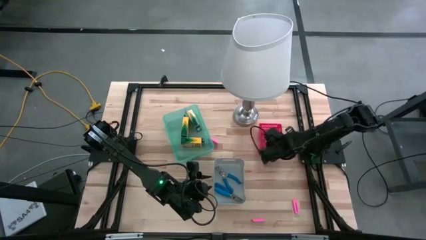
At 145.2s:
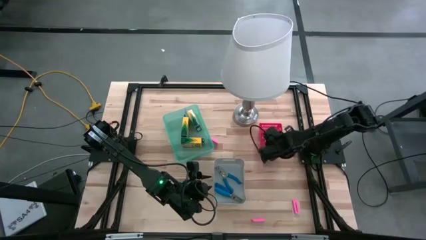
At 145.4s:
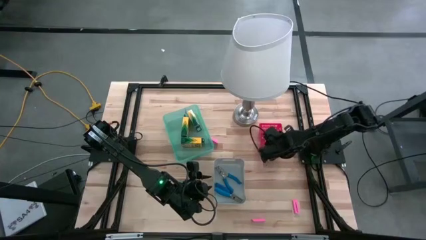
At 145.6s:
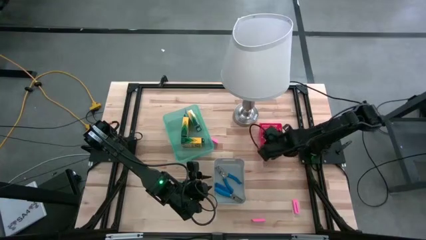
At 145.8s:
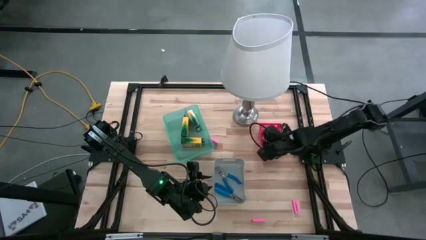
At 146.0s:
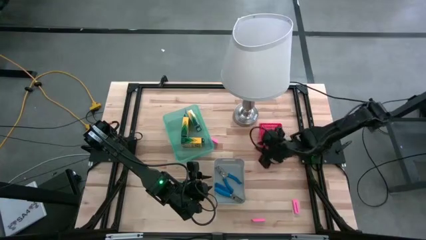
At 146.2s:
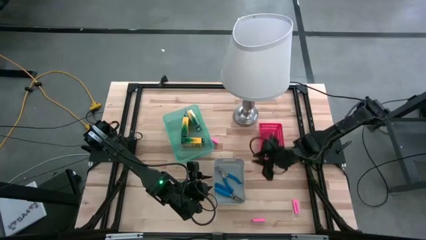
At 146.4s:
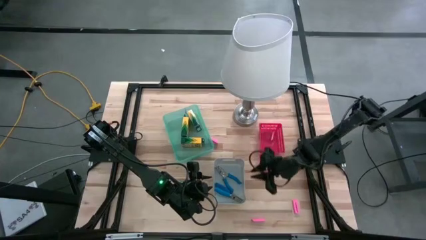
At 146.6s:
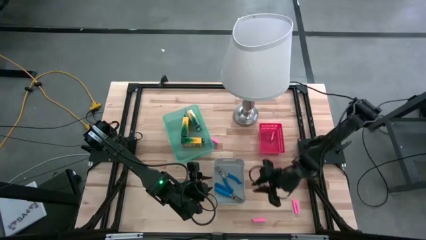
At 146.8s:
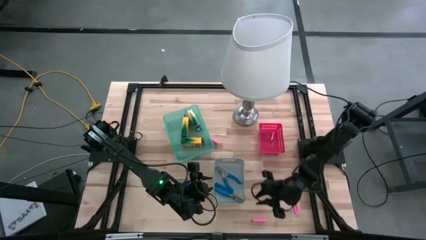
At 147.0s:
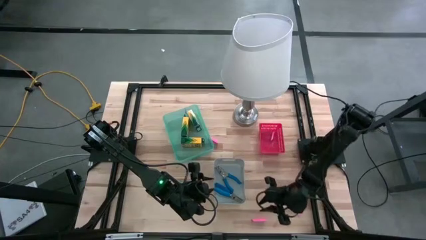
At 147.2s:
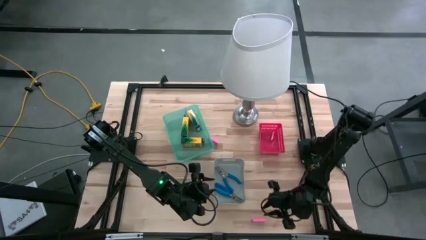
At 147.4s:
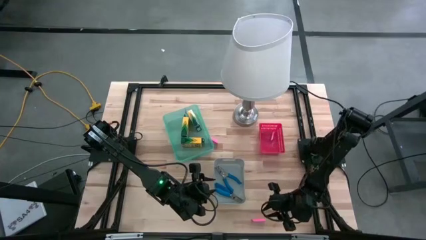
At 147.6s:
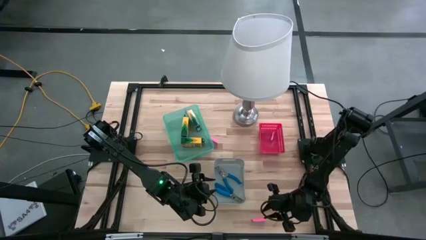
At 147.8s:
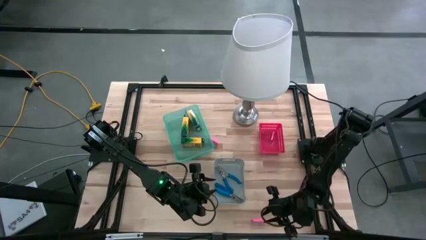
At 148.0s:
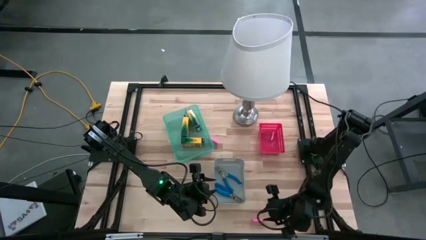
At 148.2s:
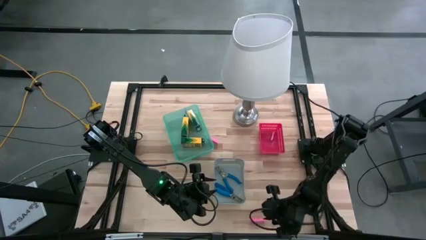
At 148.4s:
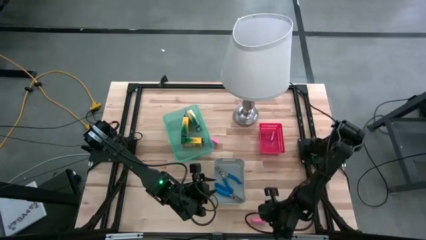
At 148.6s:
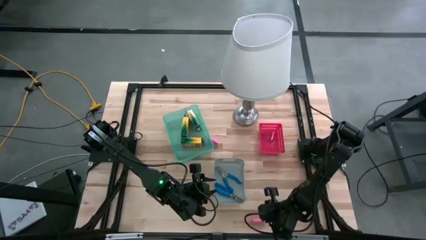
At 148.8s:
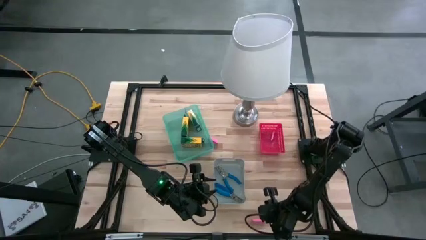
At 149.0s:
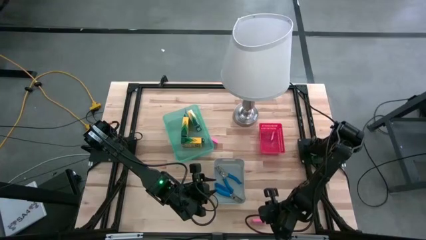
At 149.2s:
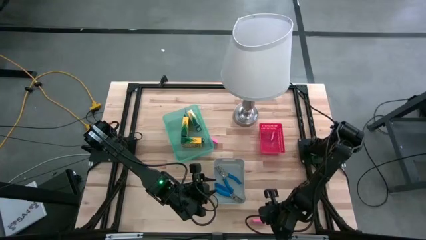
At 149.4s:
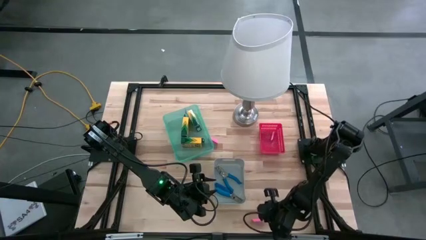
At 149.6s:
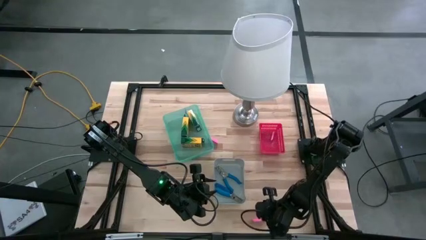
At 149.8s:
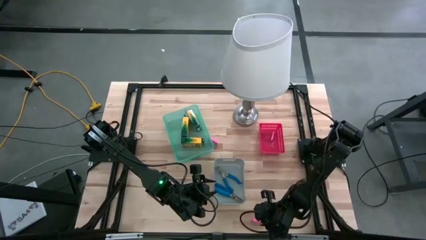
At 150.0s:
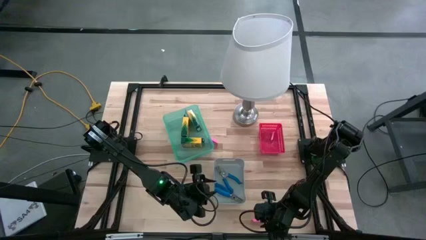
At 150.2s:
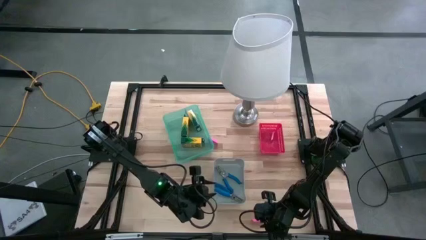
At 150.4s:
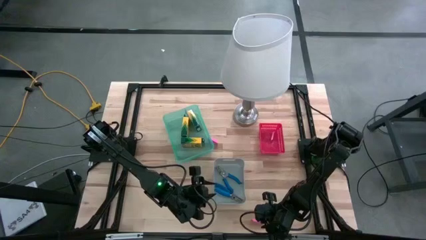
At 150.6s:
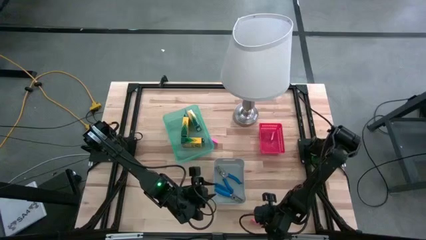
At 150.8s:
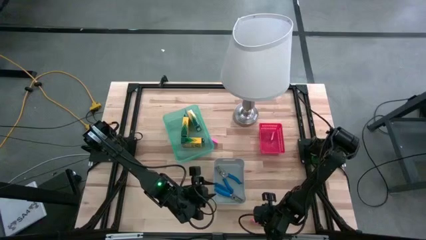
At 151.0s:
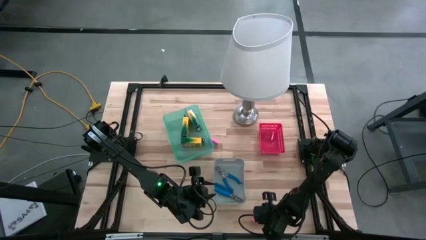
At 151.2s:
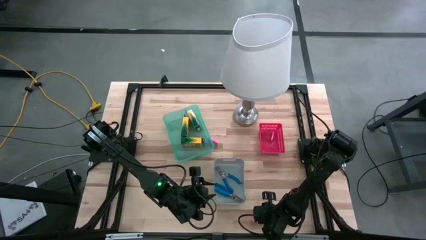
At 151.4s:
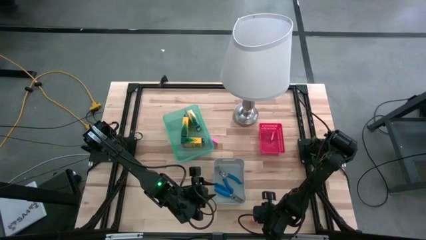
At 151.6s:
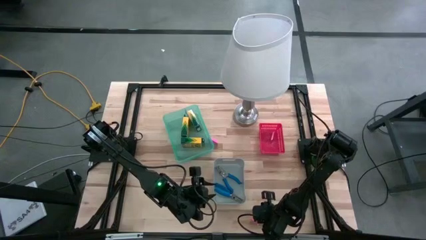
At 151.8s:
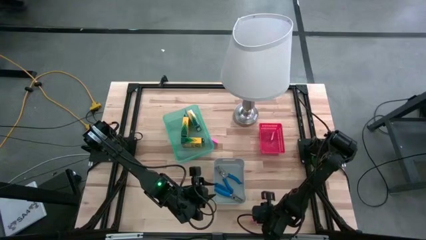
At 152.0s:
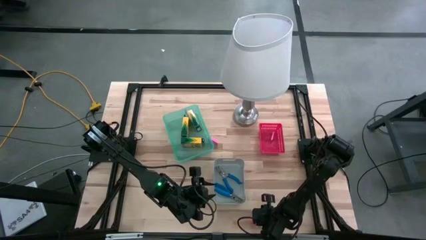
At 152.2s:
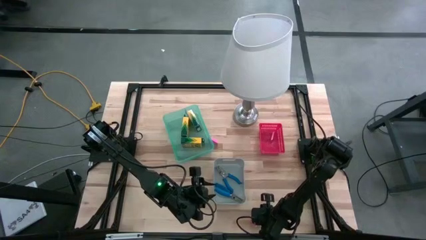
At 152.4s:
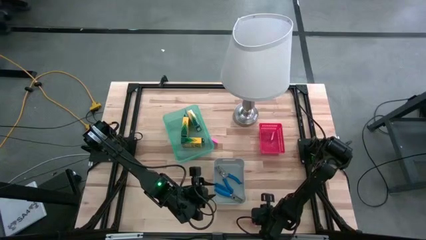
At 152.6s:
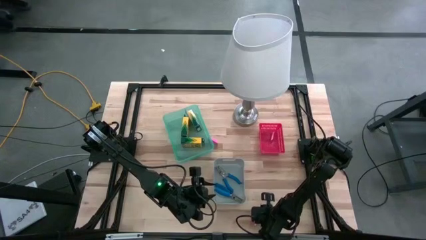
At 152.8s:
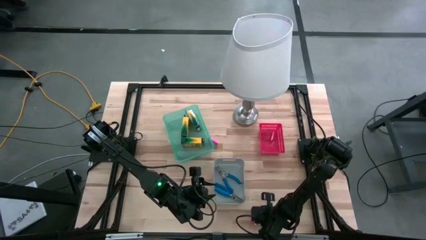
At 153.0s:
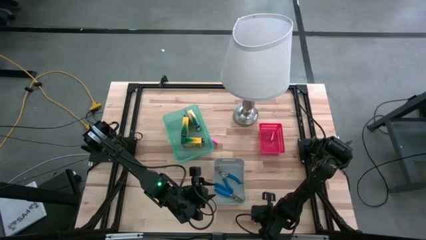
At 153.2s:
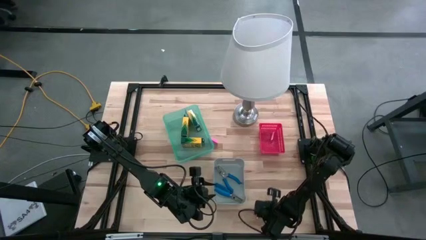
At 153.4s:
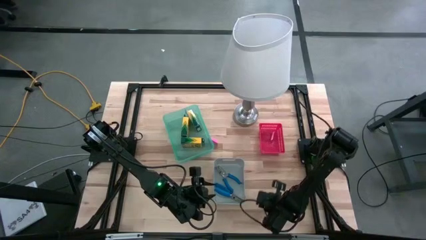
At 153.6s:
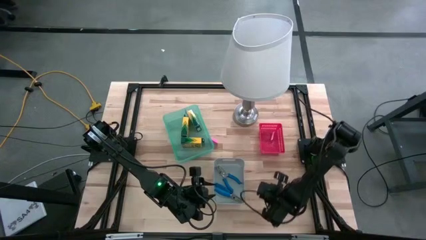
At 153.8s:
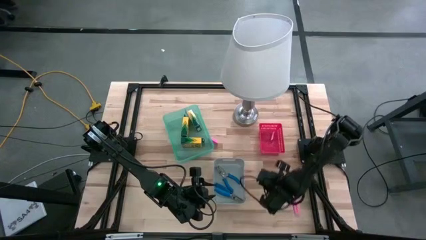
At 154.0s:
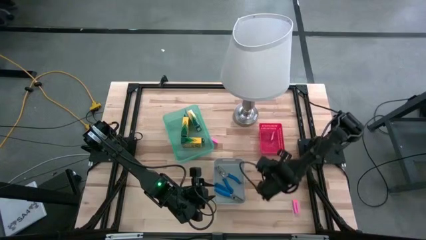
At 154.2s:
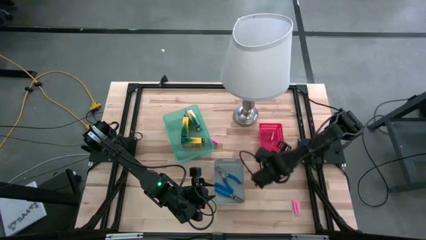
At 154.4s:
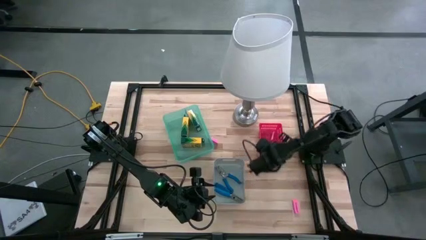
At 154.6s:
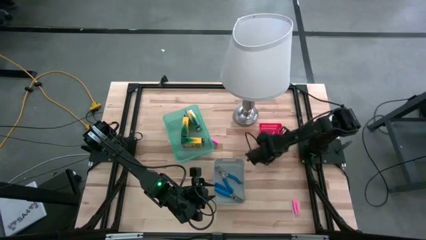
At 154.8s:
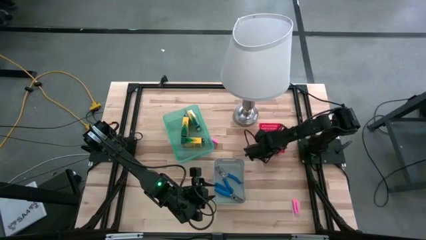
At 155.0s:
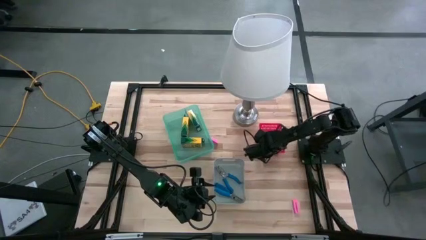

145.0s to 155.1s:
Task: Pick & Place School Supplies
Put the pink eraser into the red bin

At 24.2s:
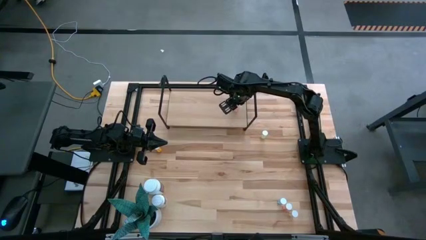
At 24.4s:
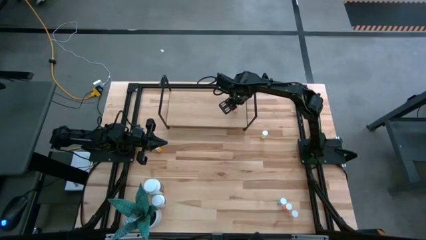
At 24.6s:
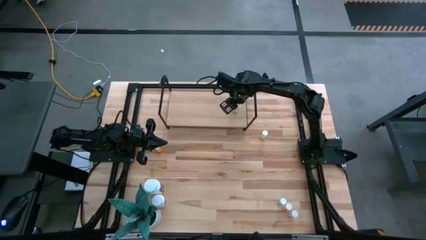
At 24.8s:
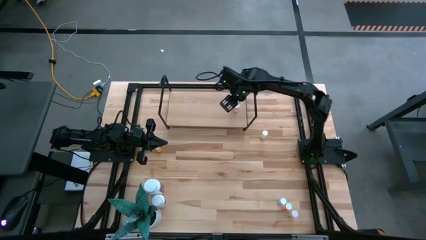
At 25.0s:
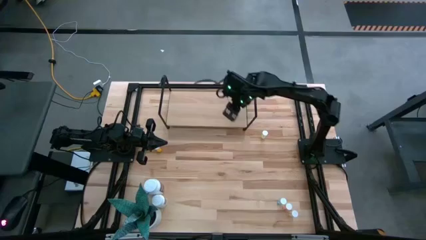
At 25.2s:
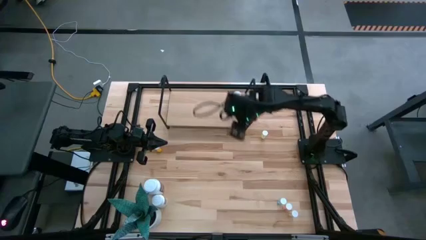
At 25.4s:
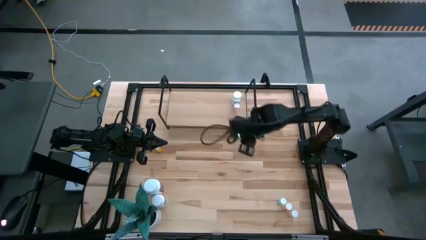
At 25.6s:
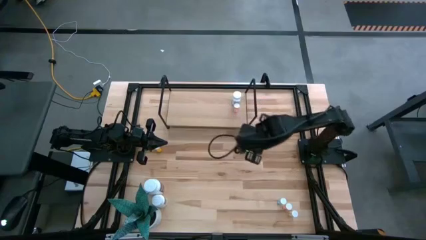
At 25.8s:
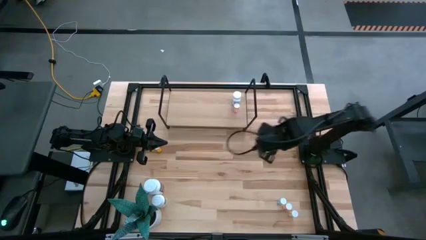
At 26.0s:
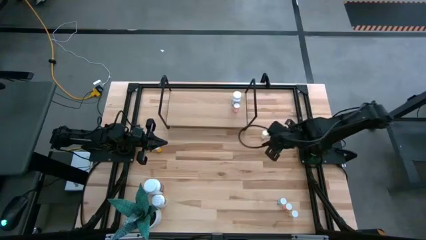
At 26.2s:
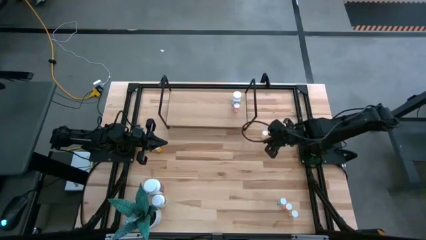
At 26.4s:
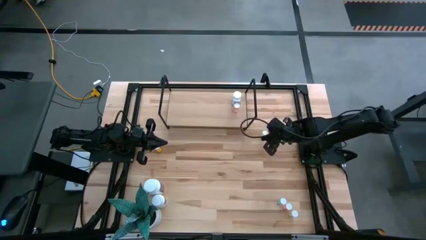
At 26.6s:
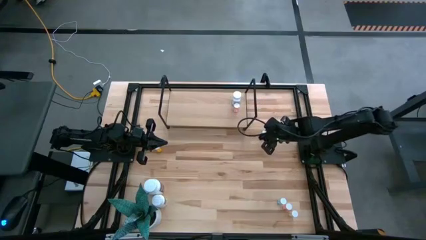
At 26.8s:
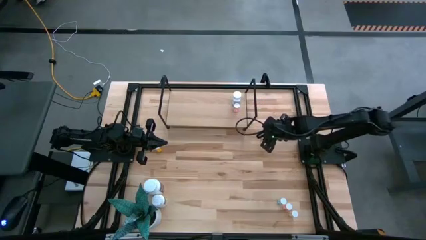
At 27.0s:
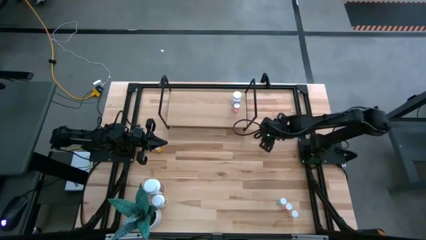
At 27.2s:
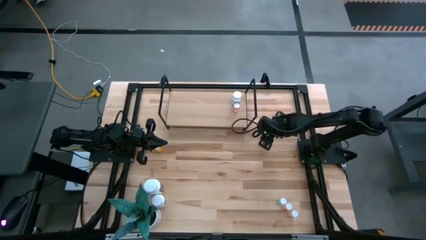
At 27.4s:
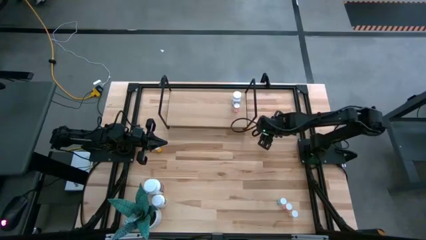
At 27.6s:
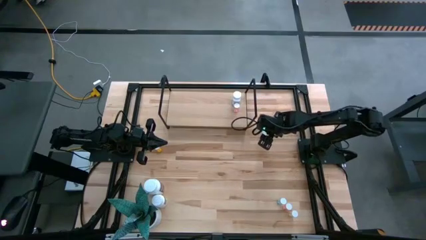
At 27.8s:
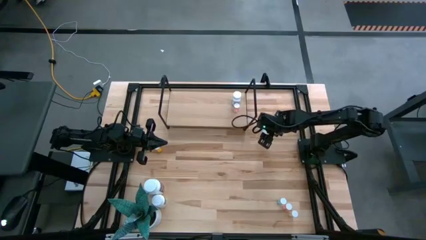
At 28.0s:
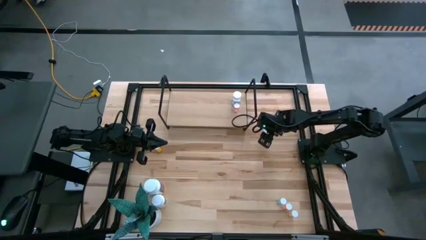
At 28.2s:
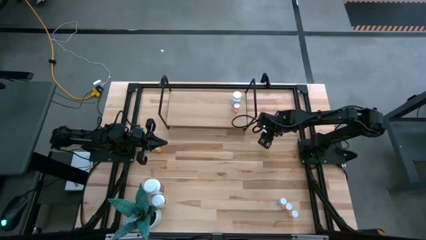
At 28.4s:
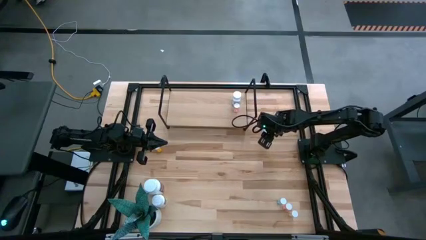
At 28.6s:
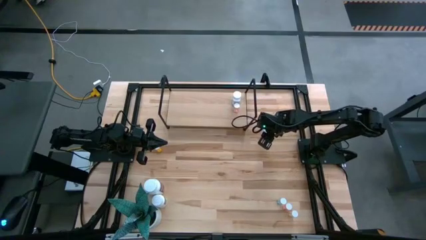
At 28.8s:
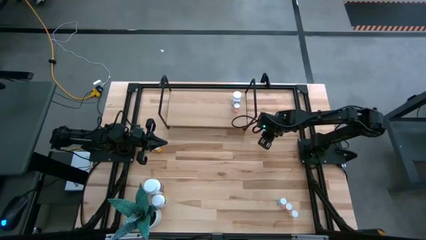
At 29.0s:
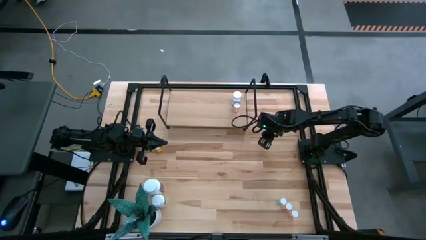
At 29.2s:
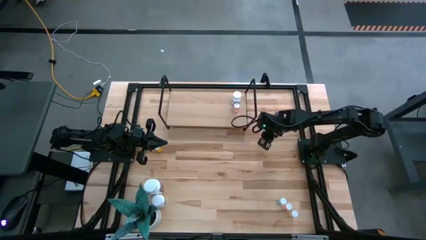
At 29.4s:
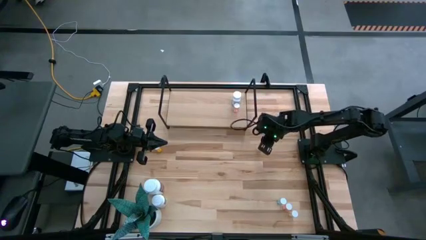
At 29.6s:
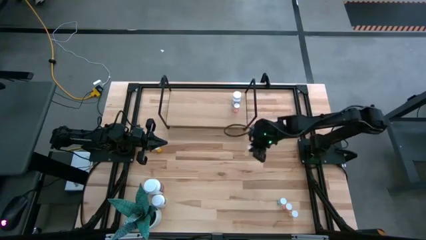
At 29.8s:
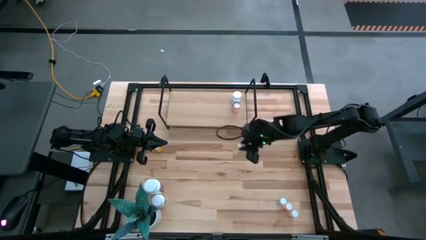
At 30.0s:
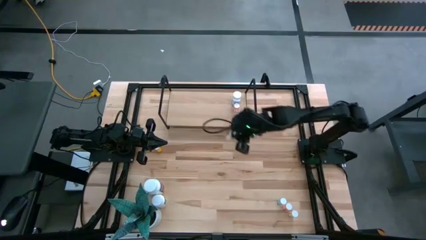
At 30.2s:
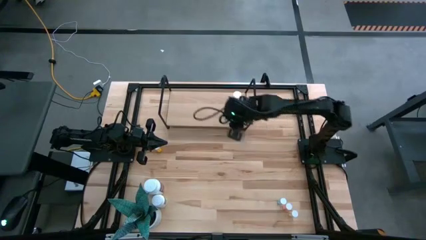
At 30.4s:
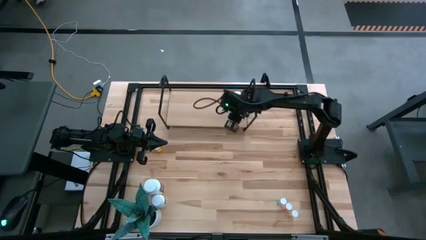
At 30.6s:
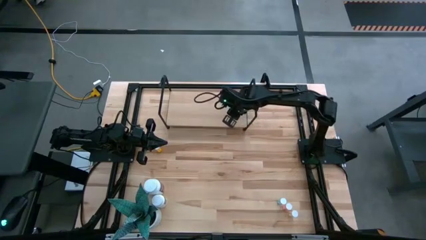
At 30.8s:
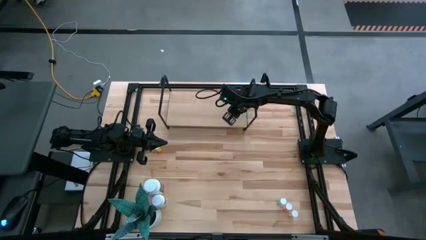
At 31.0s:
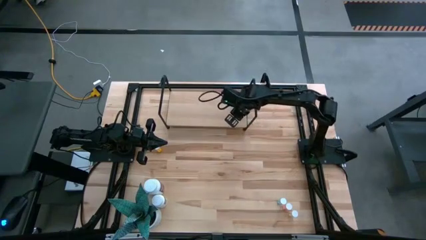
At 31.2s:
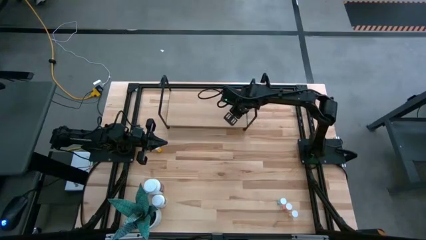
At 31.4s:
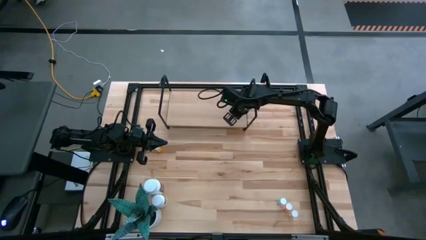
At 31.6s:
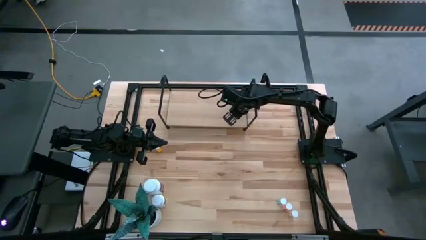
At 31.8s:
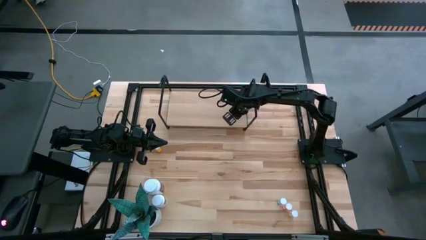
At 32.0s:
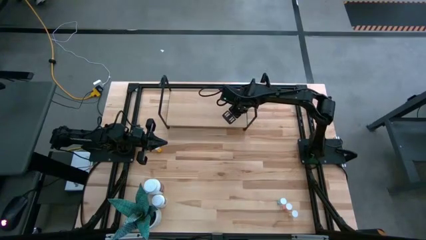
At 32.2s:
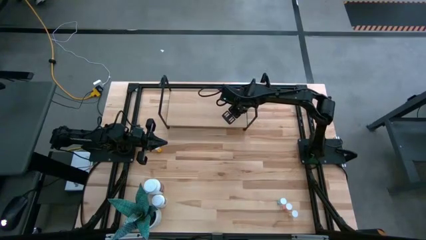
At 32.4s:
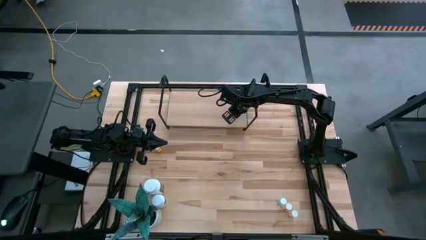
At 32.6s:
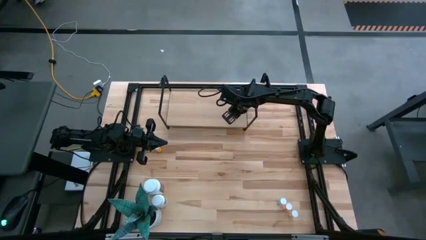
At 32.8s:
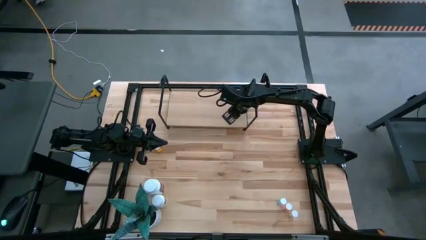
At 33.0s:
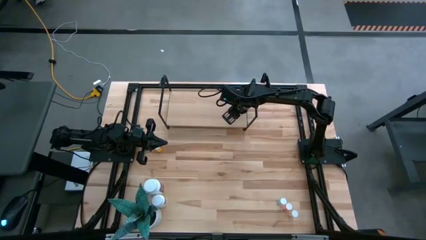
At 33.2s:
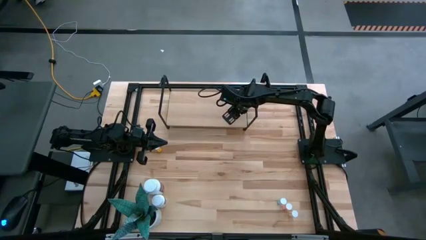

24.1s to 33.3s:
Task: Pick and place medicine bottles onto shelf by color
Put the top yellow pill bottle on the shelf
